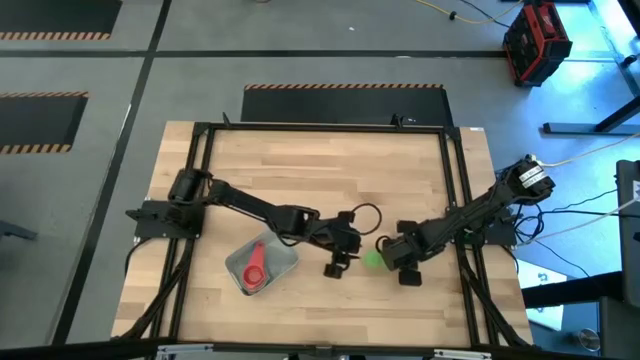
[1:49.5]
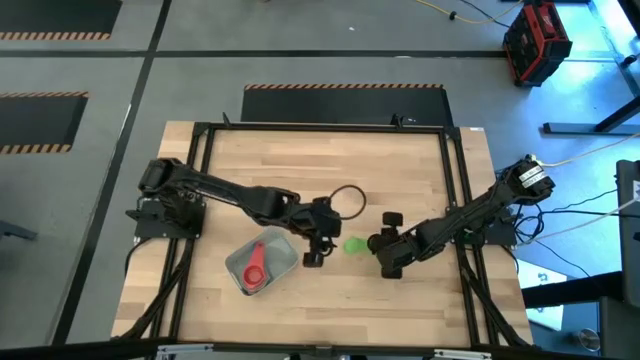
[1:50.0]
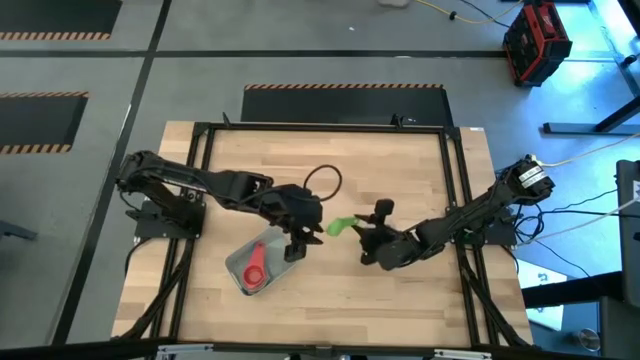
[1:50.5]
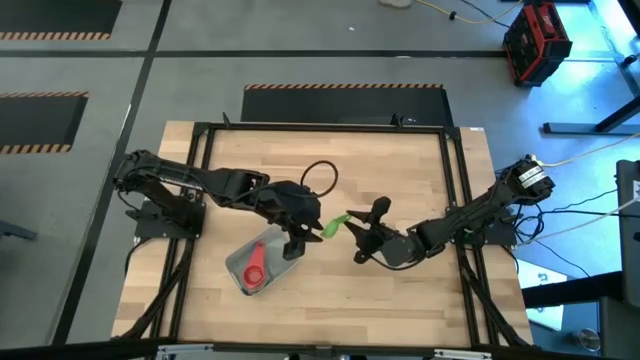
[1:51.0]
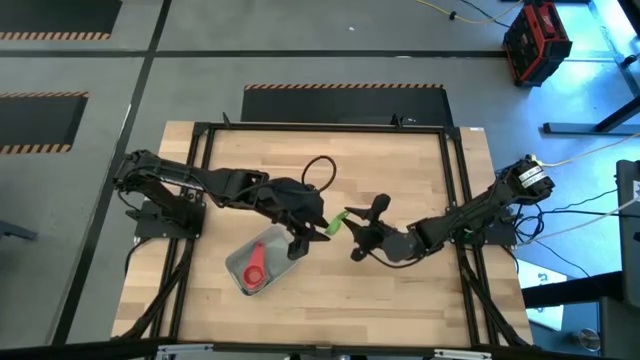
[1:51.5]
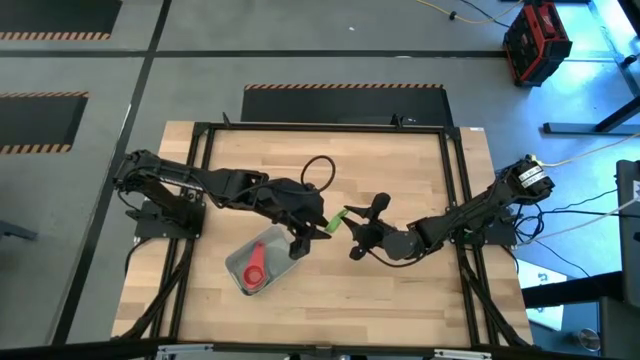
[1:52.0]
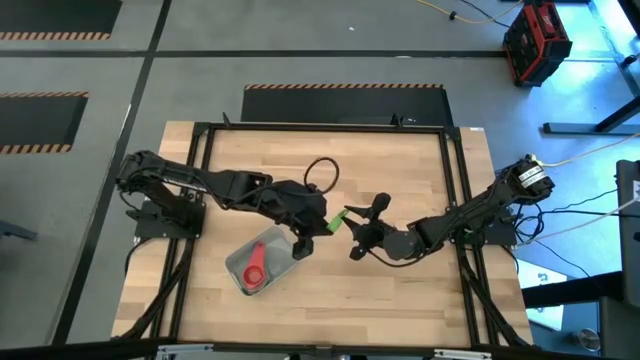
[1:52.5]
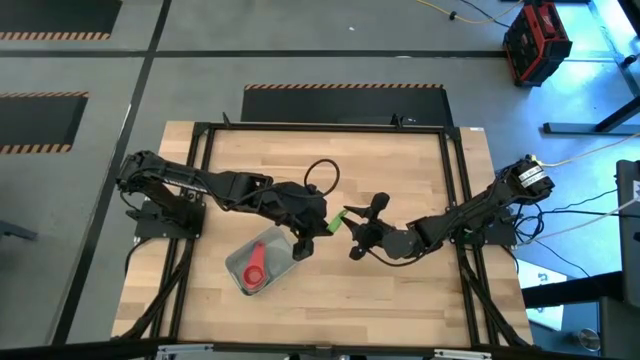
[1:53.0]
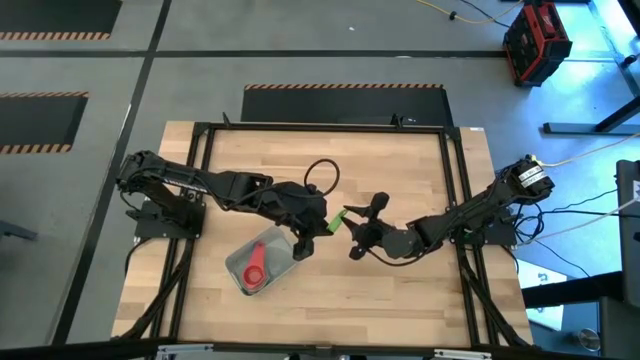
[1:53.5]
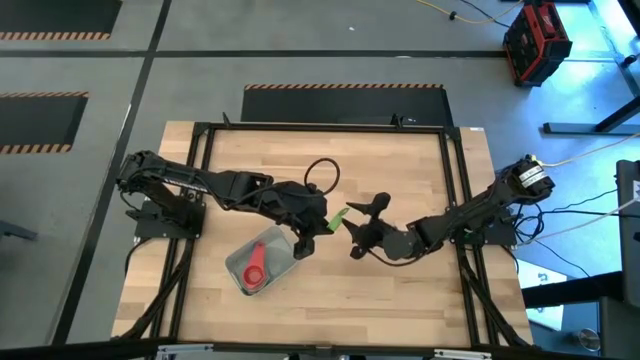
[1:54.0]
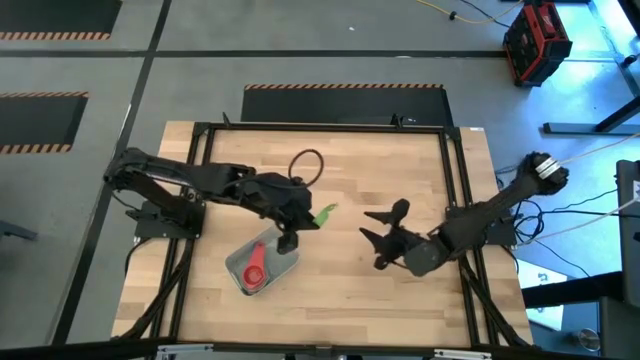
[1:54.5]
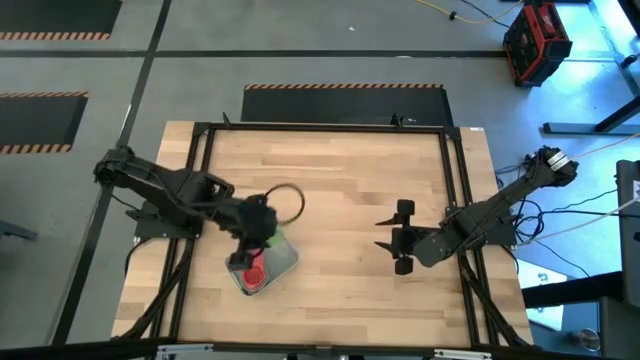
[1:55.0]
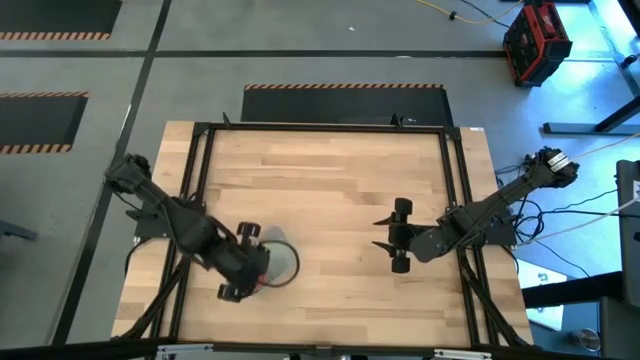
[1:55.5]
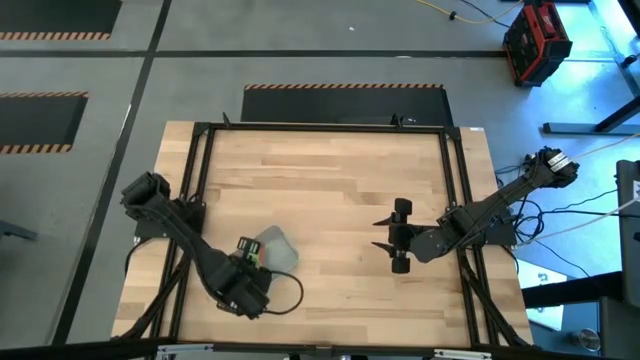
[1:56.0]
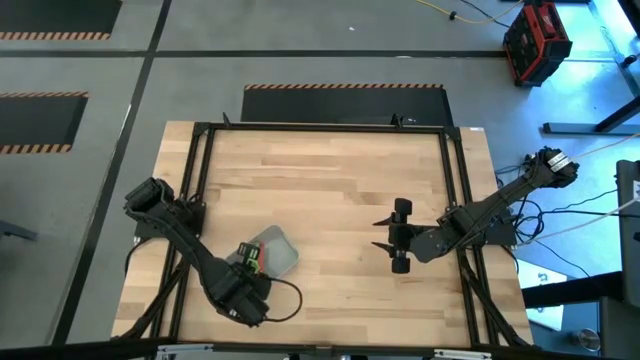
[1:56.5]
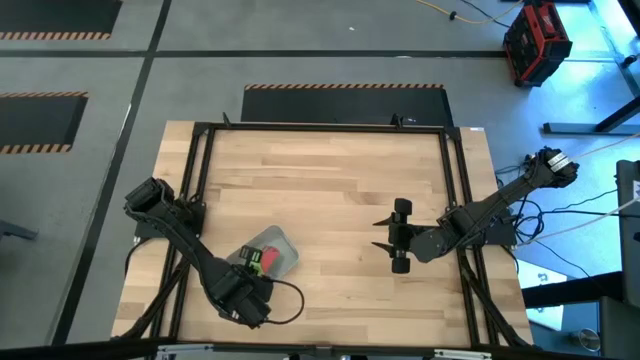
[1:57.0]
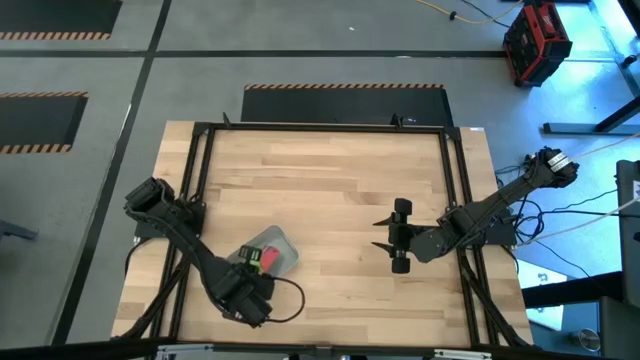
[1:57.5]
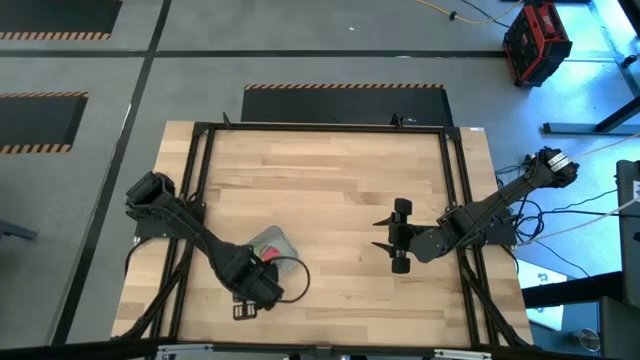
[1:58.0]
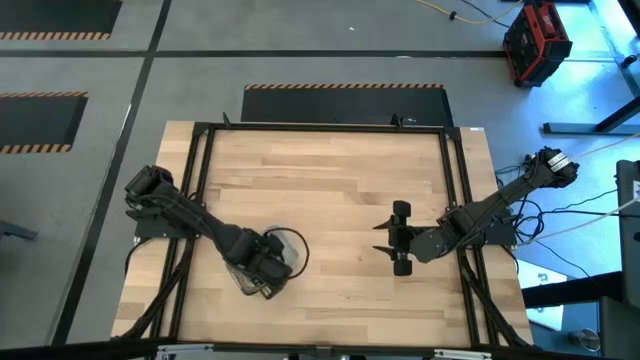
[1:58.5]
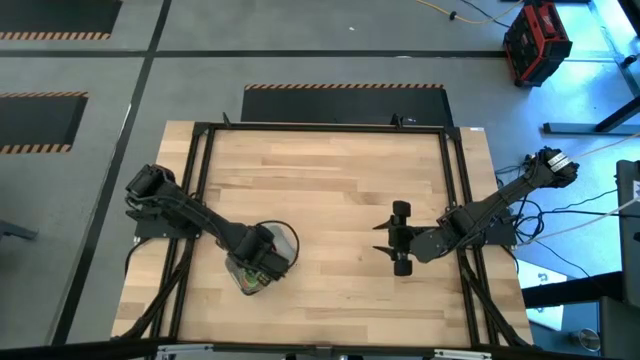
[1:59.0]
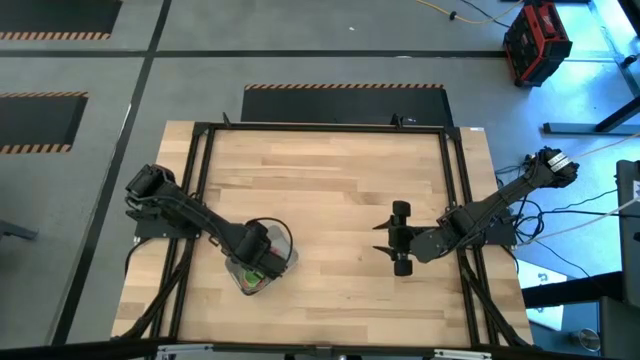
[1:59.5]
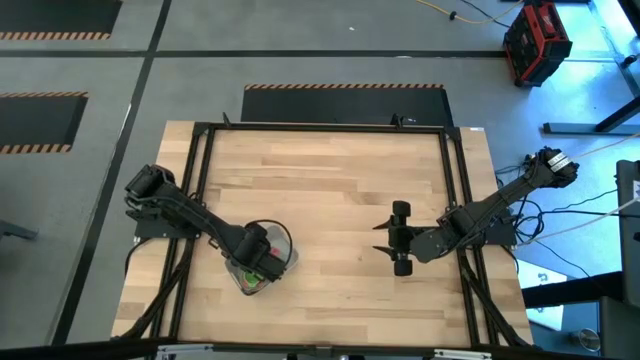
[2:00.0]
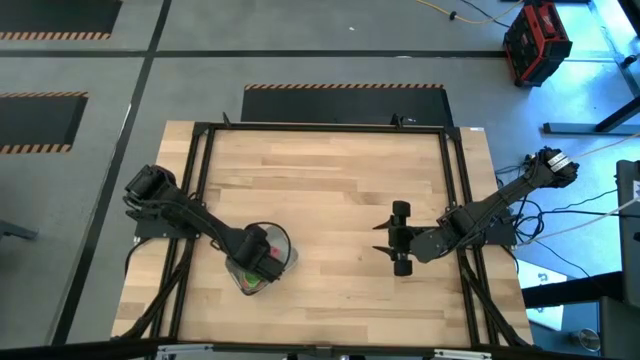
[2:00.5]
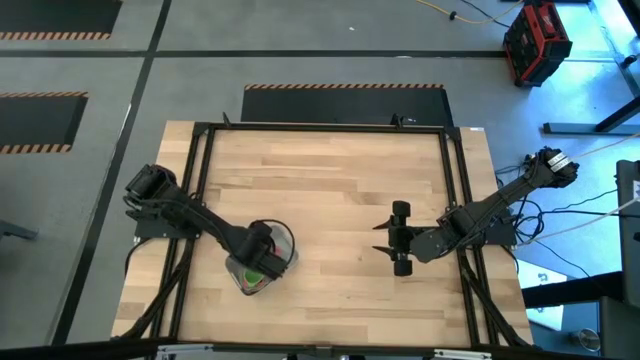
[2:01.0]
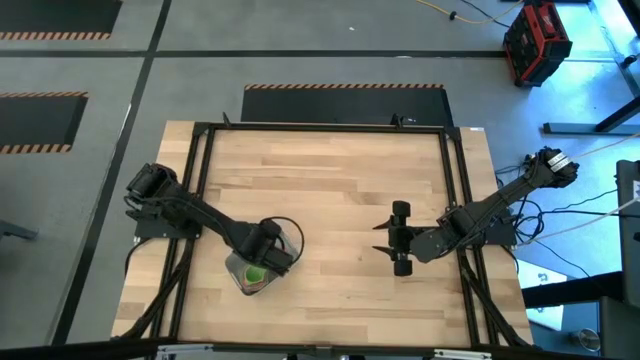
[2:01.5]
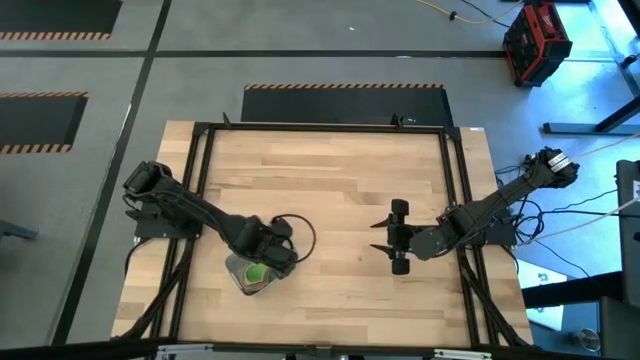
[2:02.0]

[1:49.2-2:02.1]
Task: Nest measuring cups in basket
Stack the green measuring cup on the red measuring cup in the gray bin

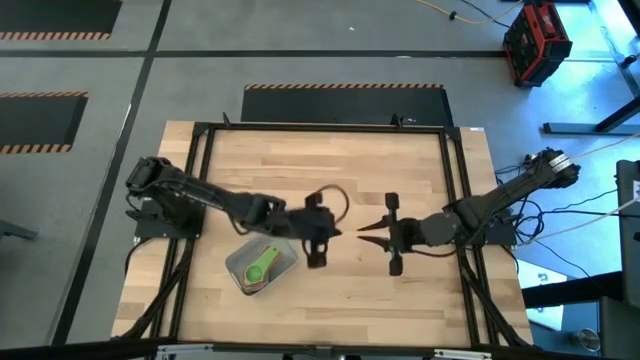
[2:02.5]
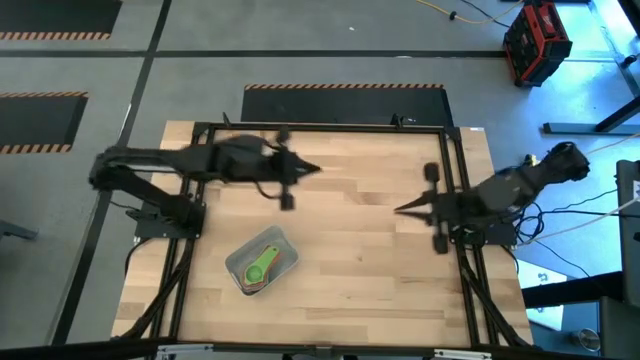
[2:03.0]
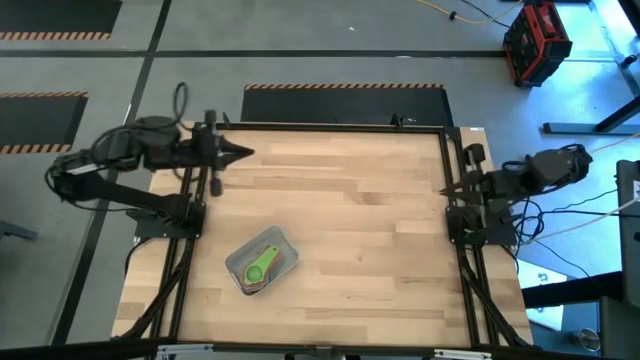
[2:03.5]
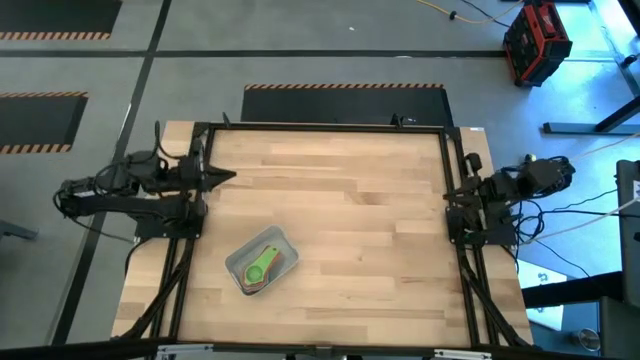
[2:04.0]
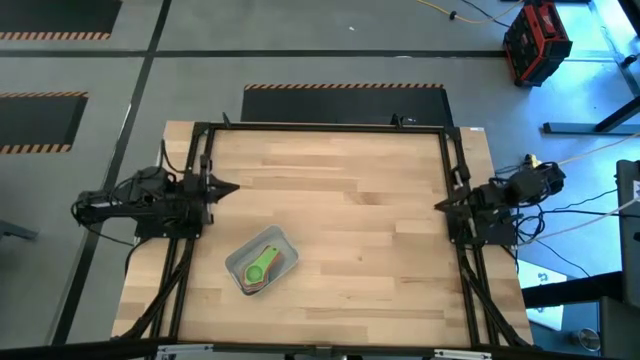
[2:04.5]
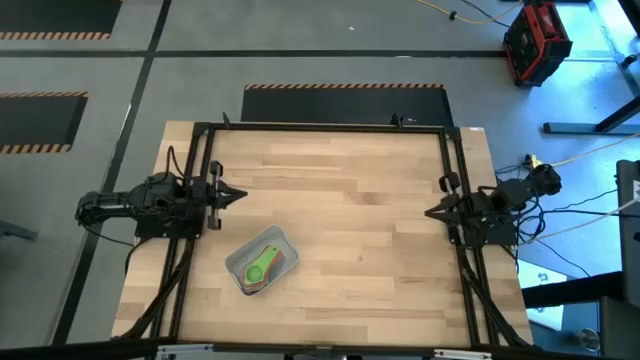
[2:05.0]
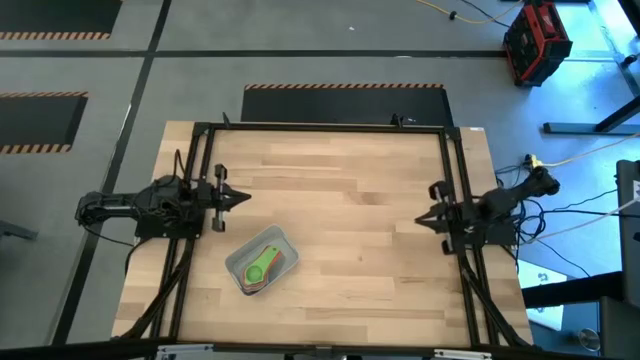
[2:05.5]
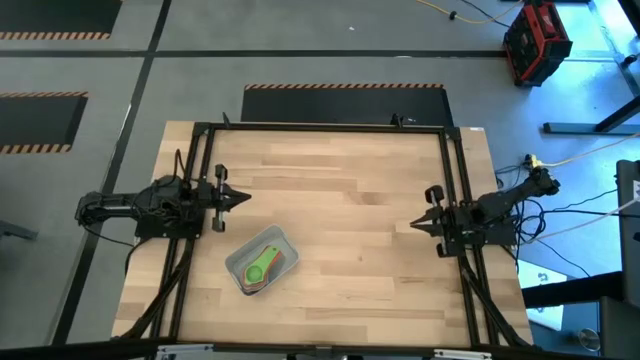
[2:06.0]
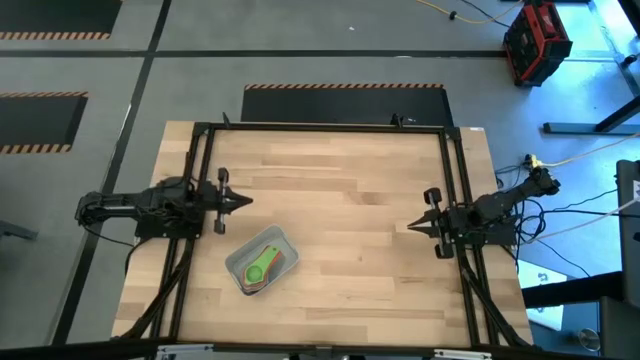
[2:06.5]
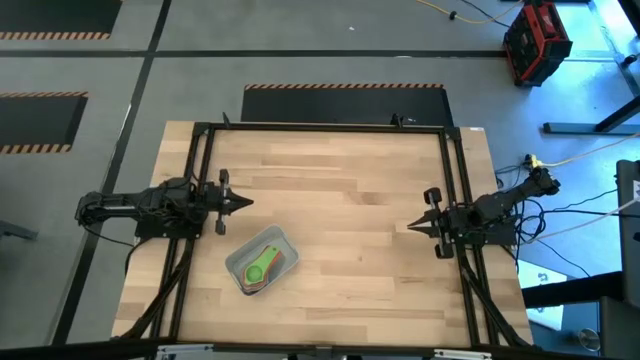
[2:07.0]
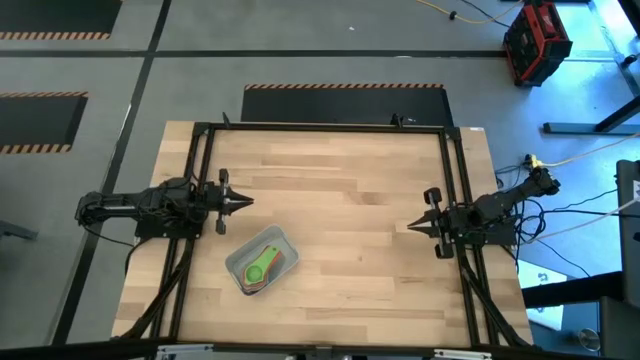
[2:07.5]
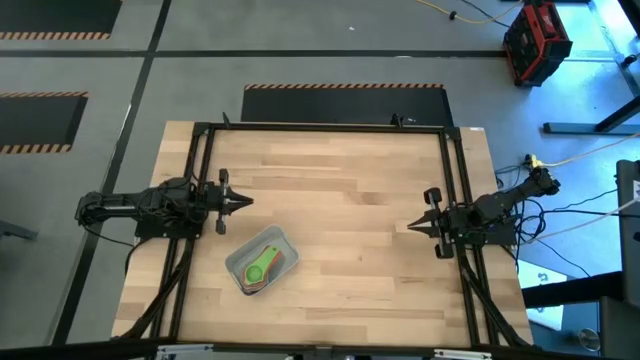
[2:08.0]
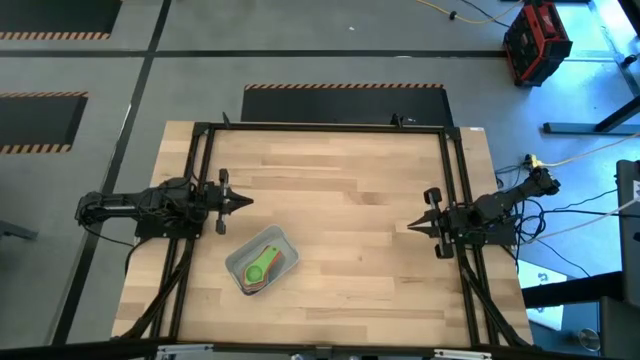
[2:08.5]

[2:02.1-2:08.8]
Return to Home Position
